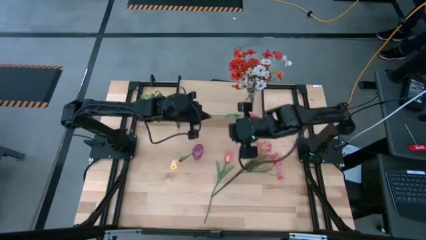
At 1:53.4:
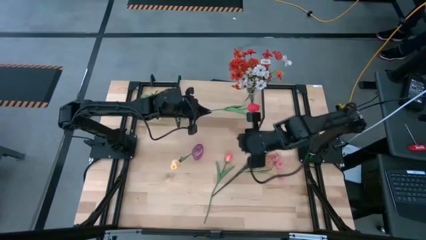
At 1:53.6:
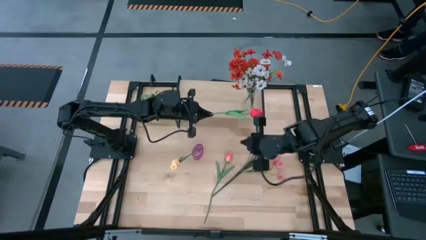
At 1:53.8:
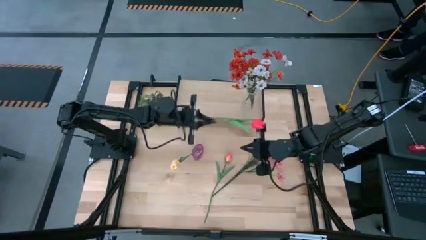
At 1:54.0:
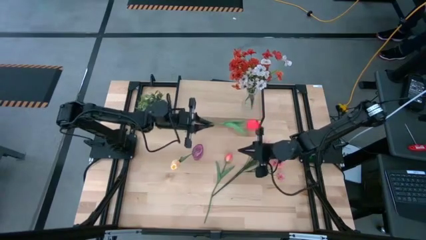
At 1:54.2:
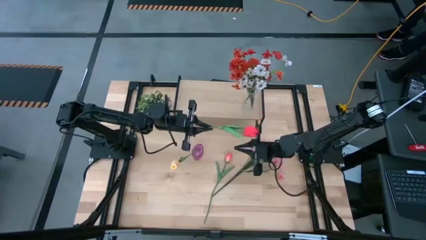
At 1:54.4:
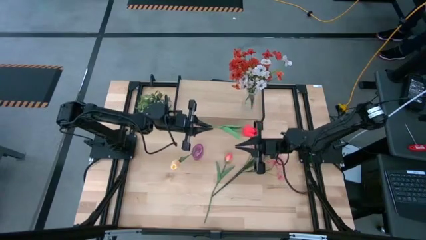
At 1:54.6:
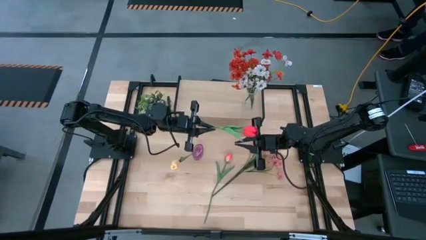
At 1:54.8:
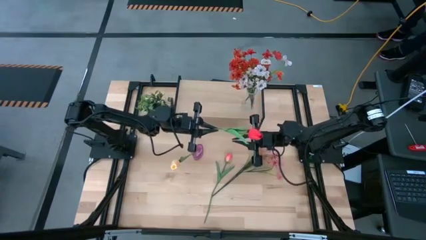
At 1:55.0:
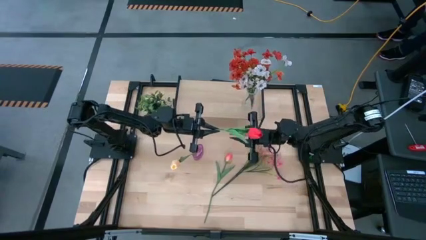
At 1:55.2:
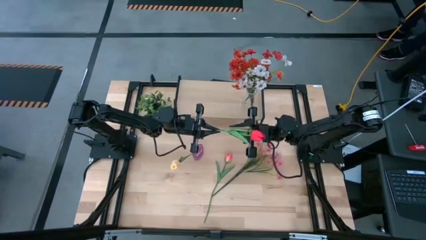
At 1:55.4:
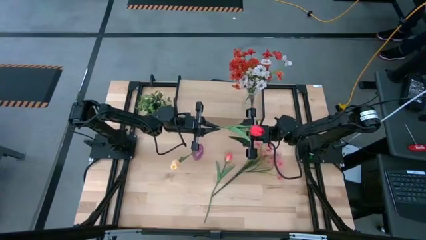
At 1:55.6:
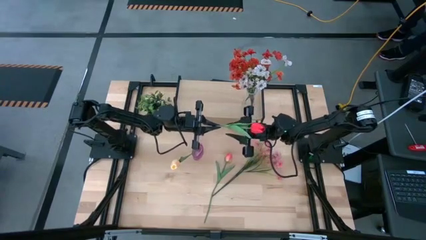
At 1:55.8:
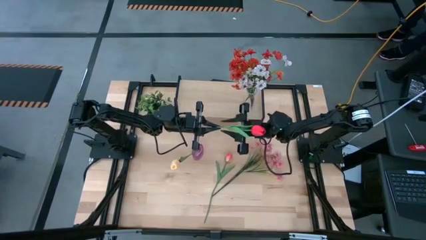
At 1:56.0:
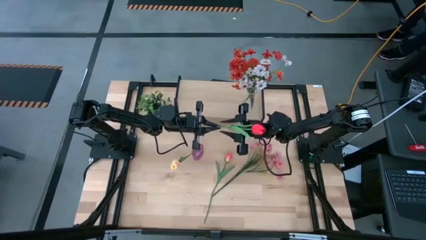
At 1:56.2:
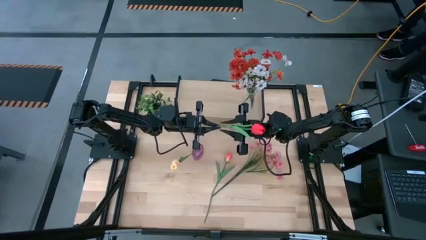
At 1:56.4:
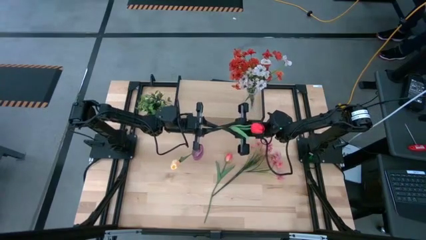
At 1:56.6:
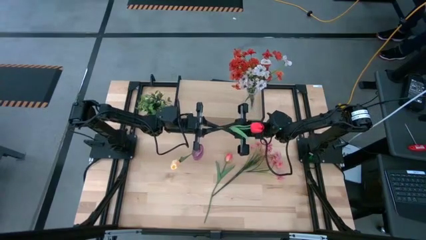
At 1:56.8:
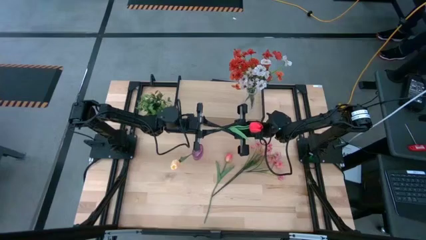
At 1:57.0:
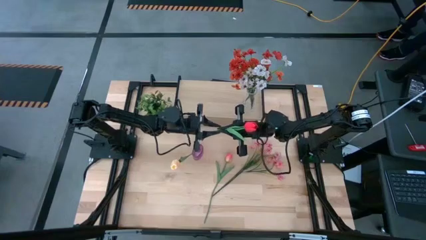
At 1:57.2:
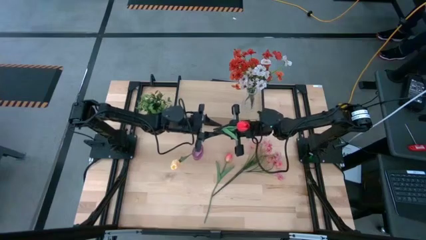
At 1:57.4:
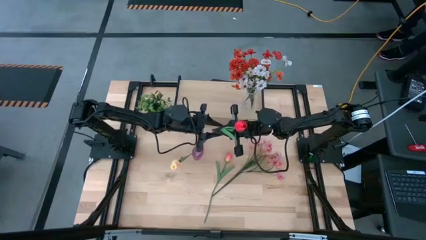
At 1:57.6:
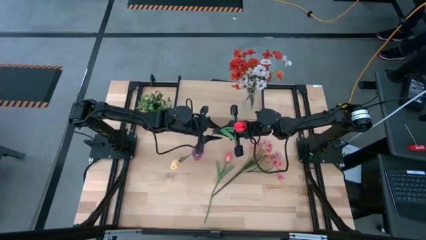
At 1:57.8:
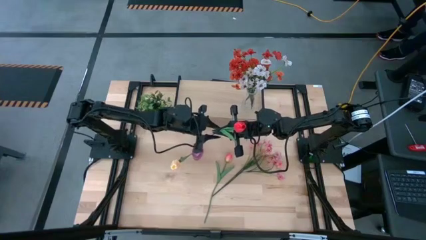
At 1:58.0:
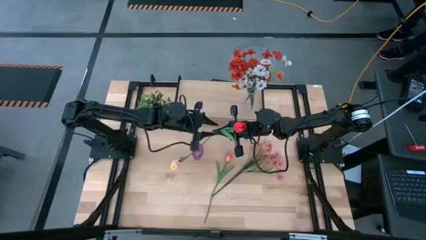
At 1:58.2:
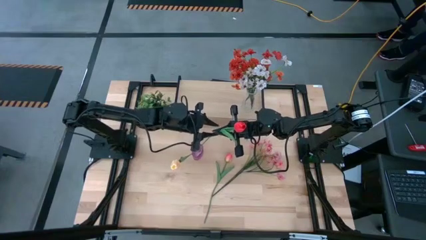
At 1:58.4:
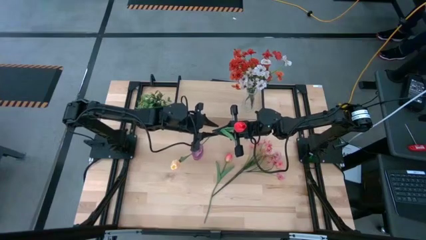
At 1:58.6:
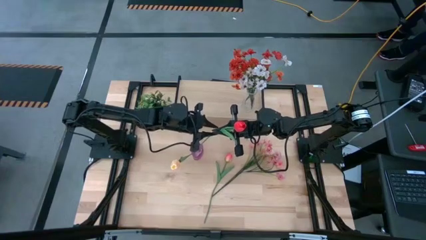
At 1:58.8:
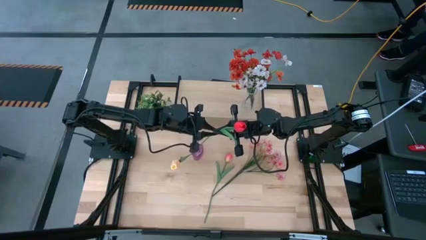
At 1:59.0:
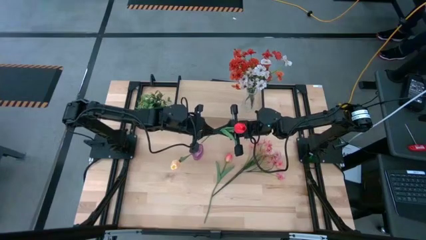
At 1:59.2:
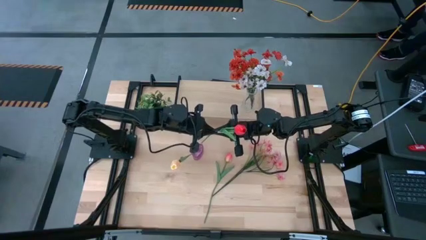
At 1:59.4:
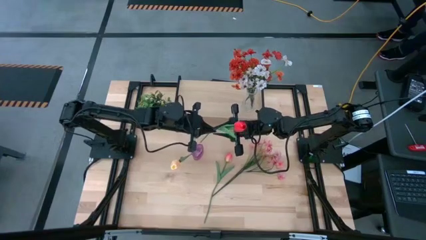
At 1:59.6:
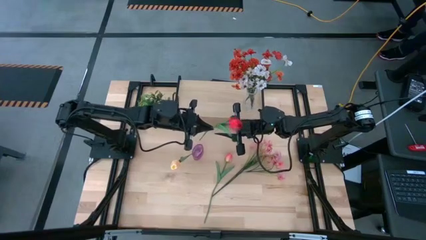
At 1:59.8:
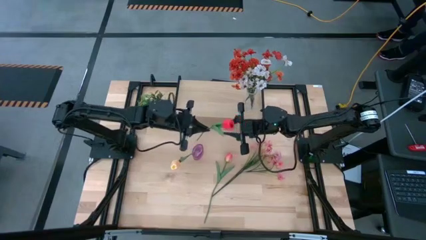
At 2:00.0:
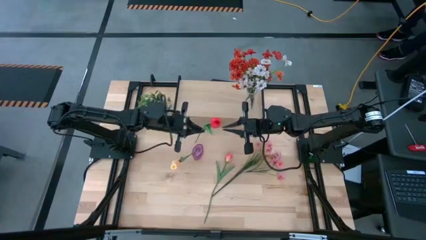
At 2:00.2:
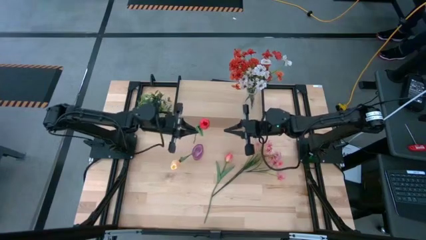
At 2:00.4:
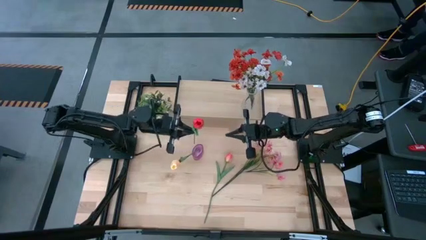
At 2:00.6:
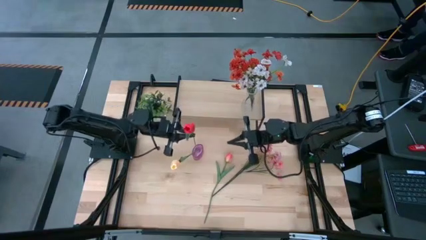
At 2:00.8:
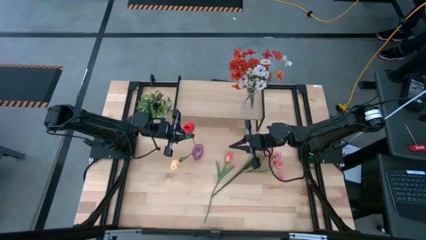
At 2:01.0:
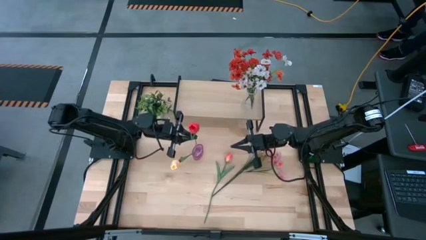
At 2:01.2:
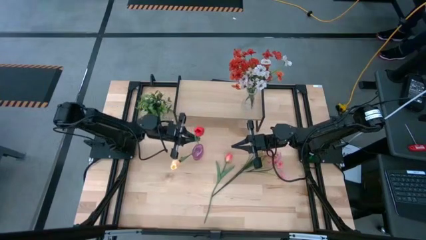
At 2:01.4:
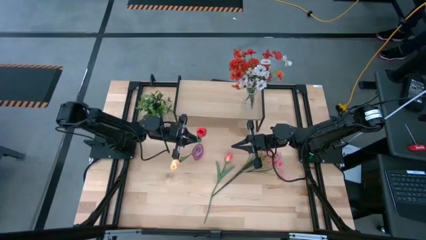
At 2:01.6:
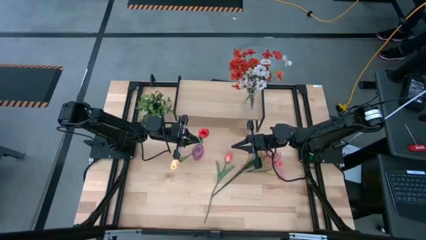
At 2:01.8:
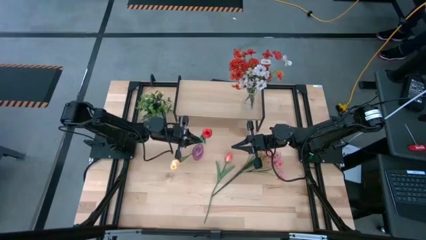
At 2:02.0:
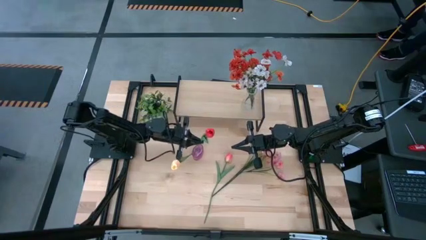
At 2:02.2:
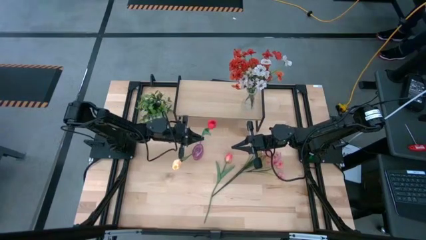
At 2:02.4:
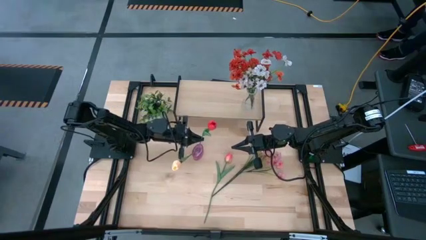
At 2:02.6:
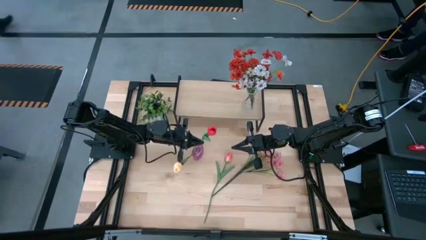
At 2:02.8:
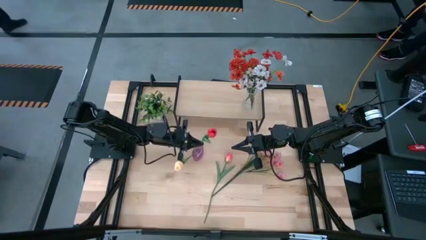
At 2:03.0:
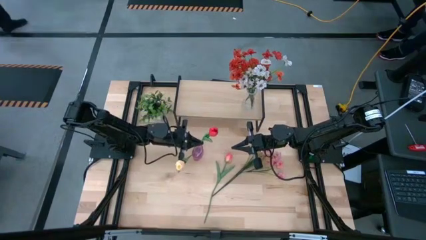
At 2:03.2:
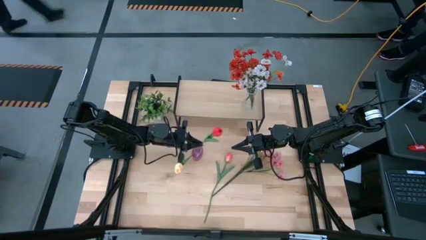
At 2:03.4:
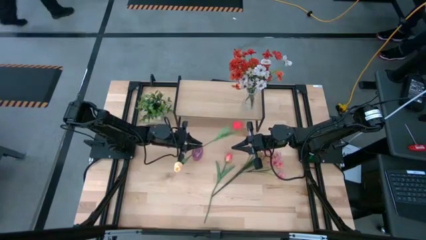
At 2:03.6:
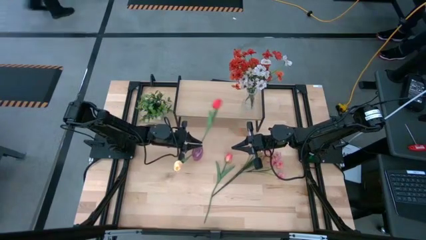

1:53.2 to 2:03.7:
Task: Pick and place flowers into a vace then onto a shelf
Put the red flower into the purple vase

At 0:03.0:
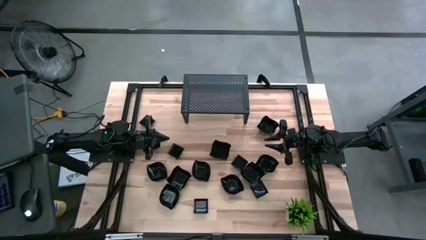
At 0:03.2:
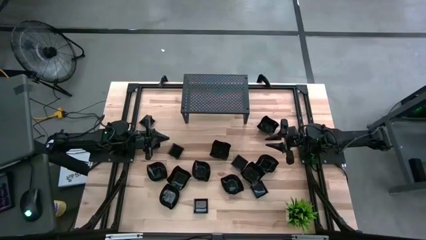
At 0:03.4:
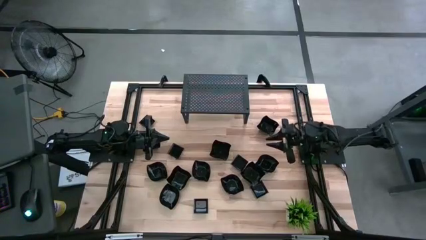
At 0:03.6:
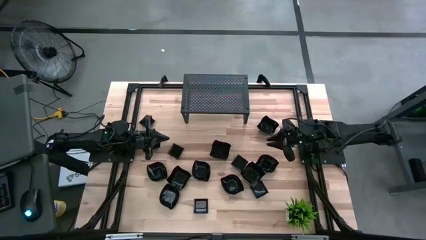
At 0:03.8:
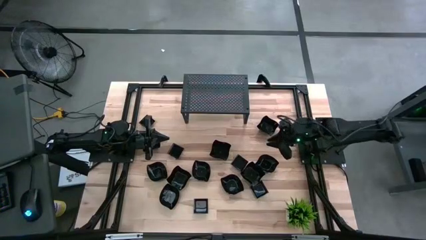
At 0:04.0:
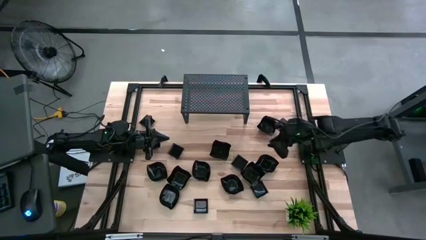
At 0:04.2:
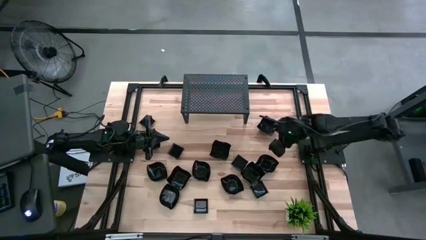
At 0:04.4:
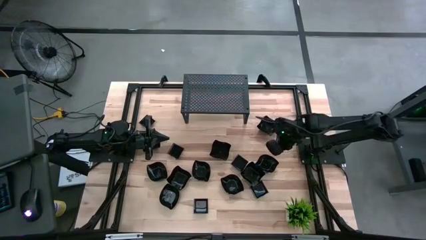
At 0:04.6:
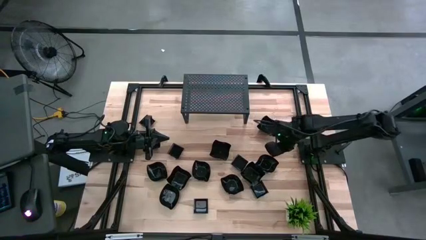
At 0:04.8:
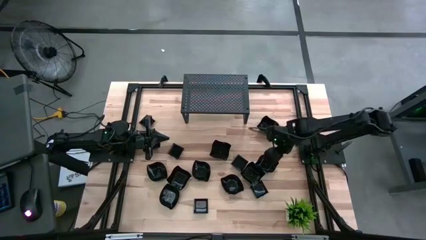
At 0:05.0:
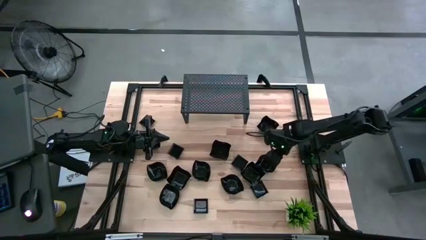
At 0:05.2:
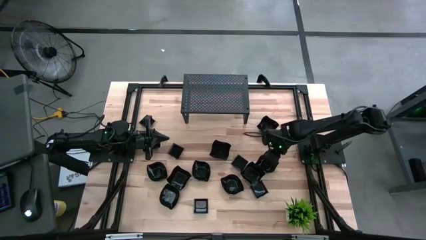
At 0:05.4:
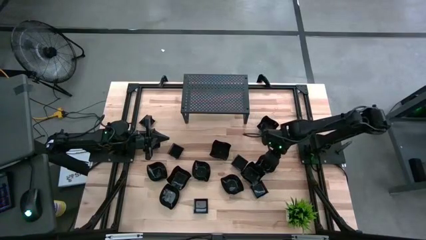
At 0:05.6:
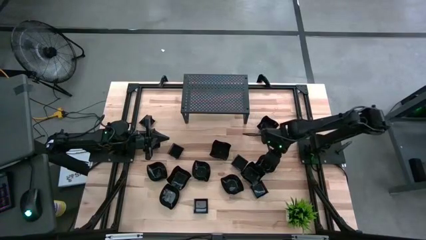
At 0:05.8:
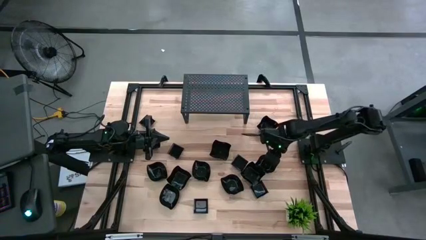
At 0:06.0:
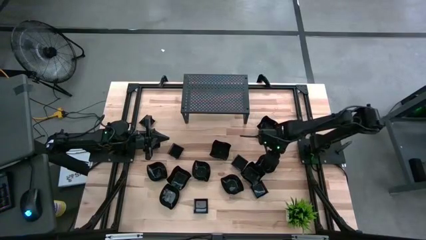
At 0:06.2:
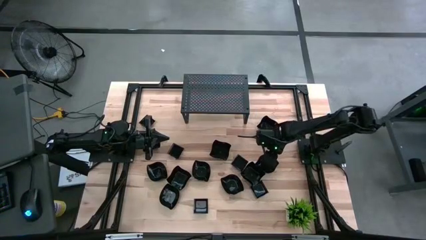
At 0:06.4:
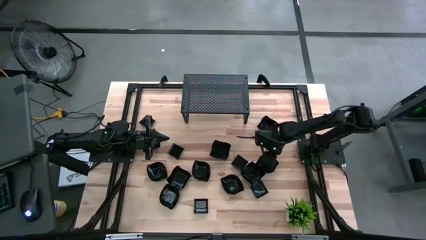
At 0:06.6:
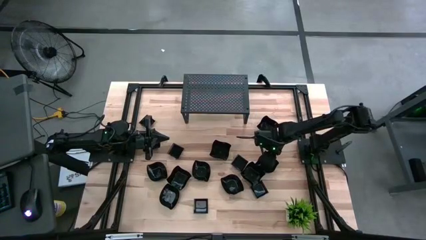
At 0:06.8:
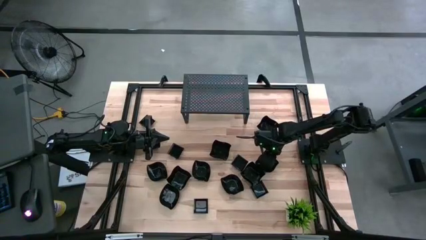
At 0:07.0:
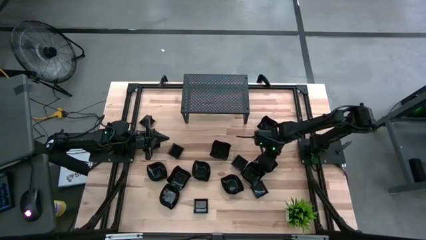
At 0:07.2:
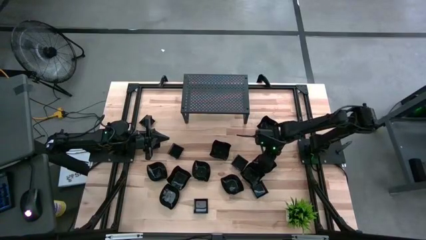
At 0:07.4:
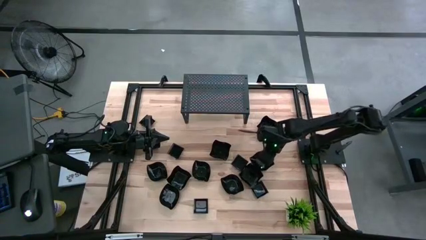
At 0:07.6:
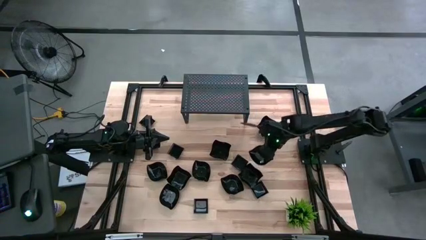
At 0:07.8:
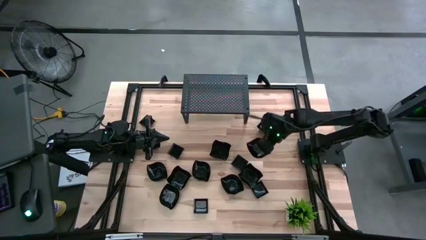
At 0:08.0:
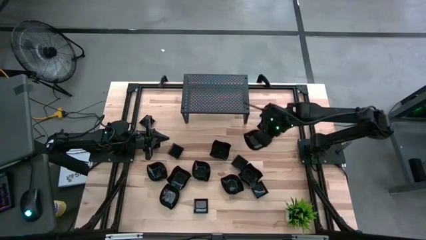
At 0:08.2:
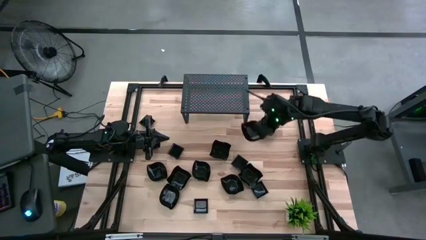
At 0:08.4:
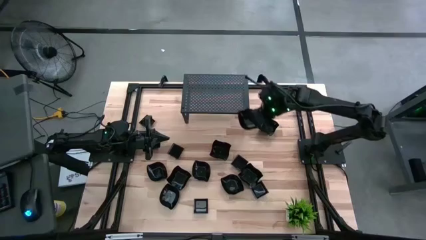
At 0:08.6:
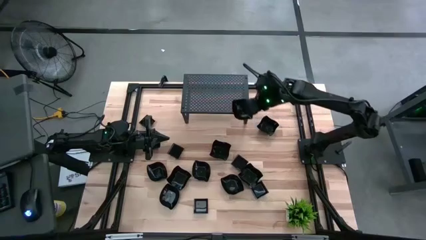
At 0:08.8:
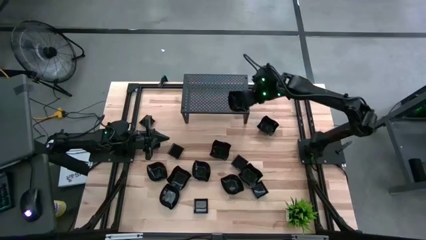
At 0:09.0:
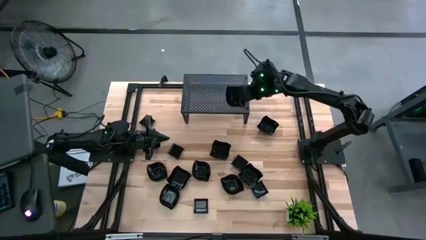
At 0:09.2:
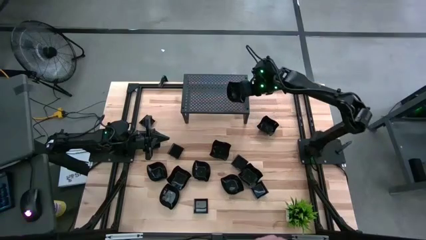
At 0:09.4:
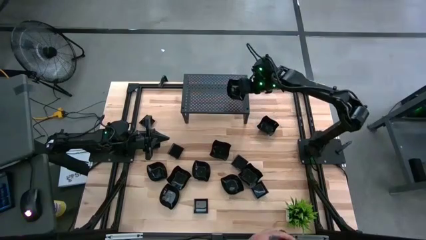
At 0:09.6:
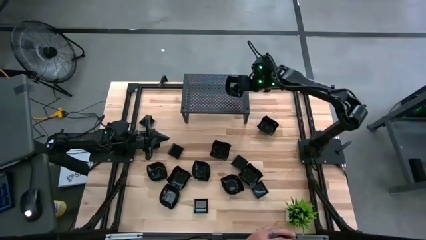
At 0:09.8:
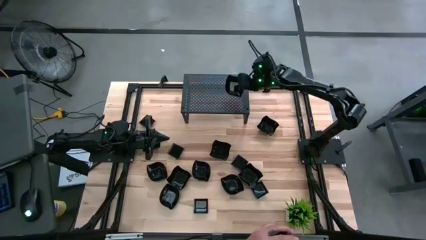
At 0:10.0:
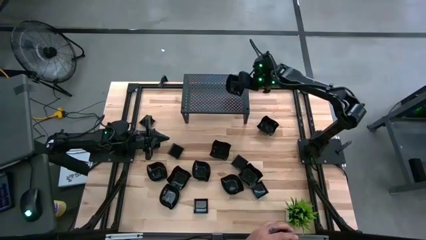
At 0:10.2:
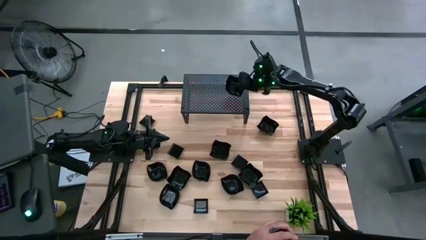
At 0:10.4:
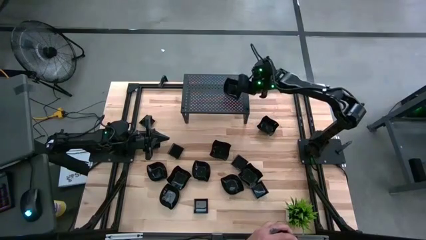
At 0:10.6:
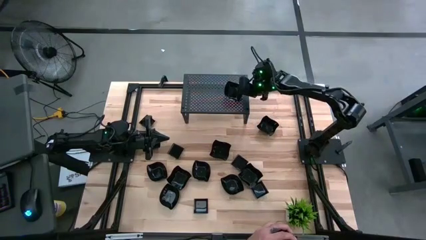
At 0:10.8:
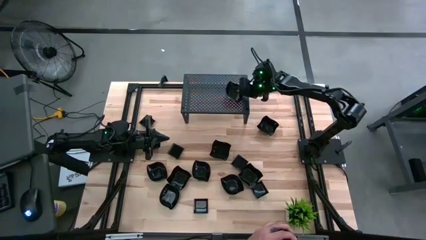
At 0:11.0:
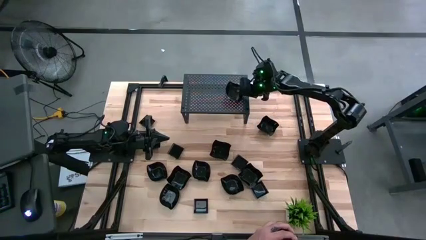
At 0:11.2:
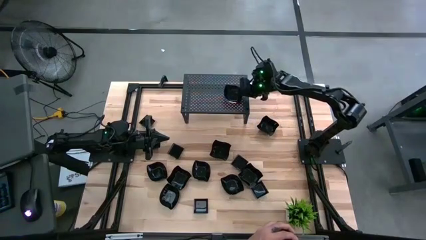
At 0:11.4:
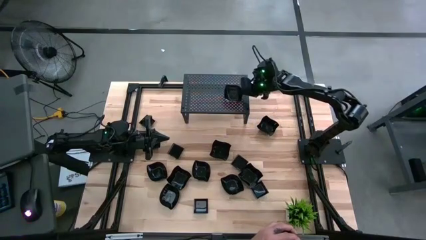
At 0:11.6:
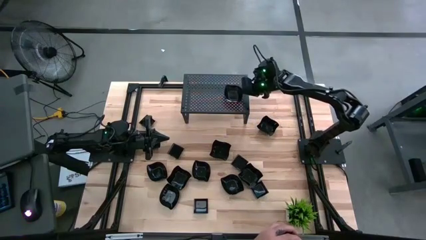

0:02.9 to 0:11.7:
Task: Pick & Place Mini shaped plates
Put the leaf-shaped plate on the shelf
